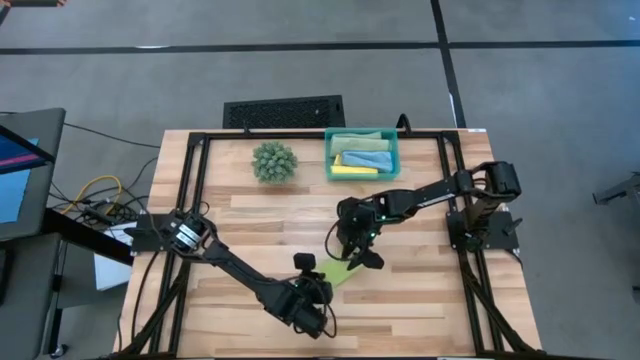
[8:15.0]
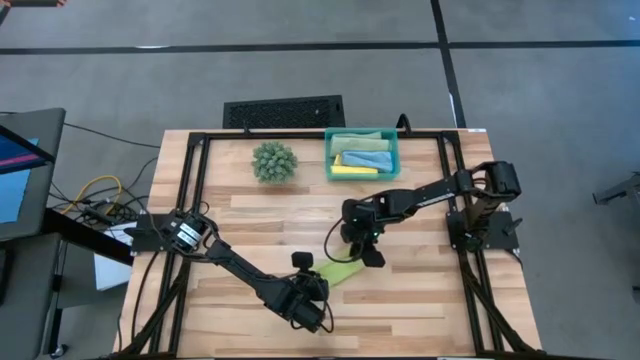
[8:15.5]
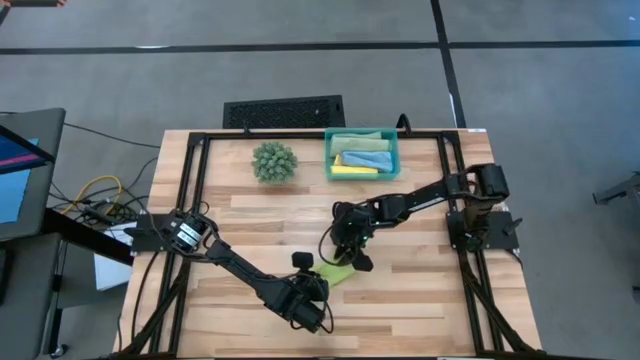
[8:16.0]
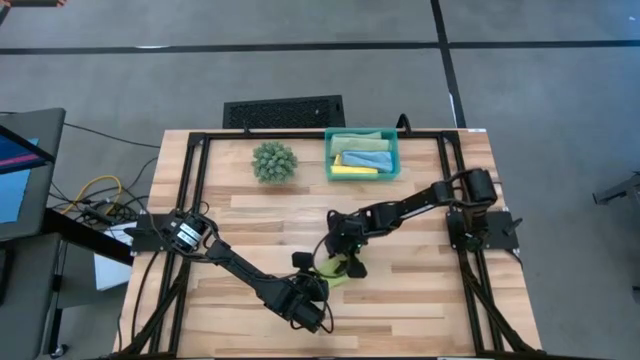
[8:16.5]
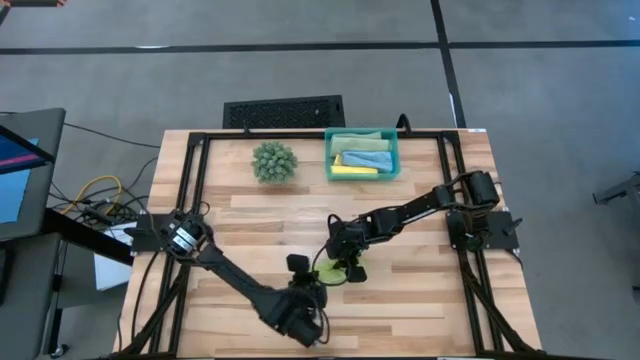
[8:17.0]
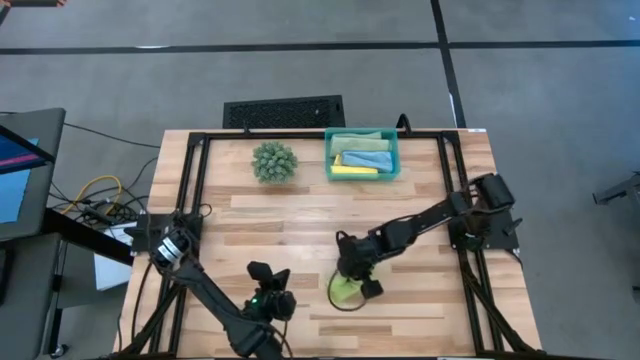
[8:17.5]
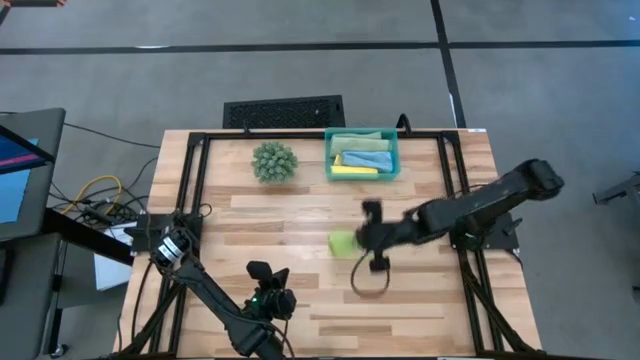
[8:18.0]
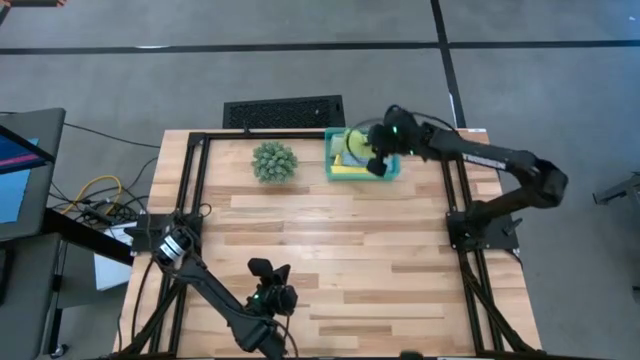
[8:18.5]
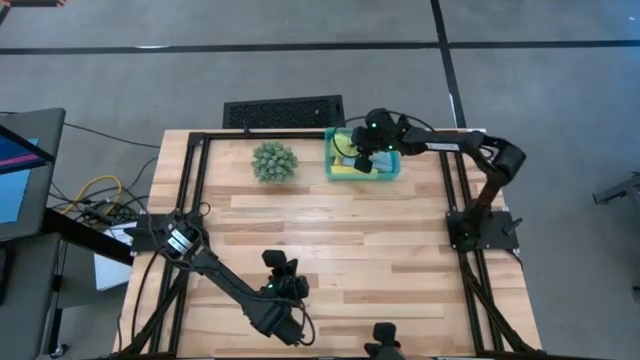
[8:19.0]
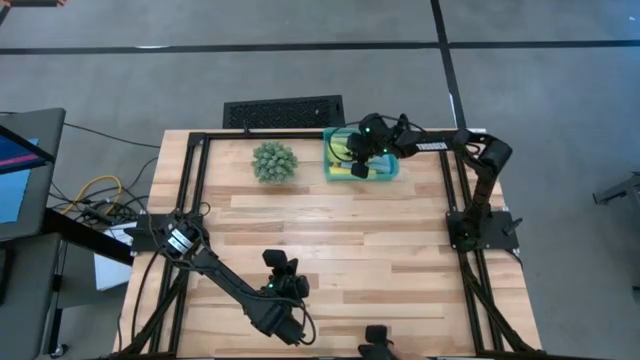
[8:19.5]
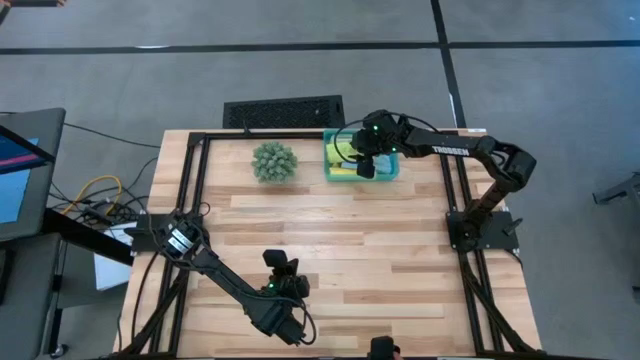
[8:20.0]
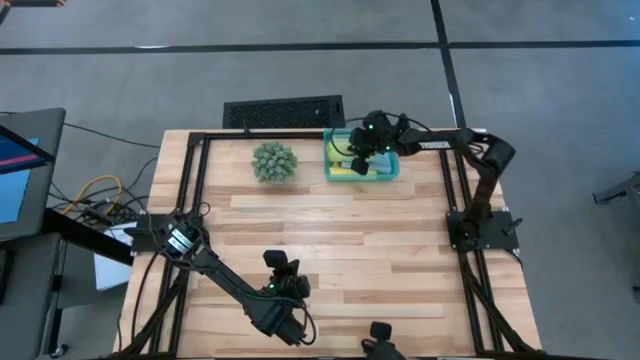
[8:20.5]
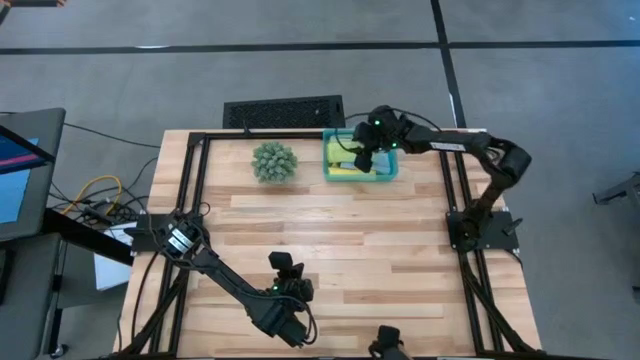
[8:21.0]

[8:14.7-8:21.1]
Task: Roll microfiber towels into tight, uniform cylinder then place into a basket
Put the green microfiber cloth into the green organizer bin

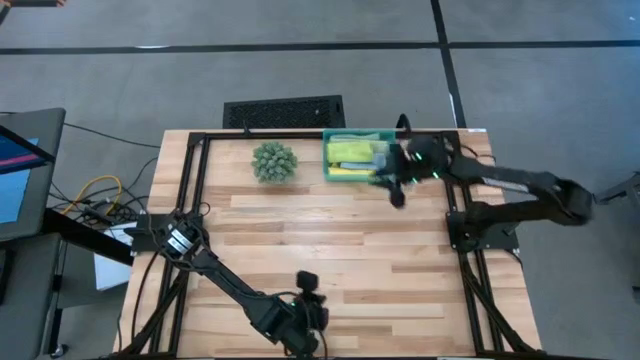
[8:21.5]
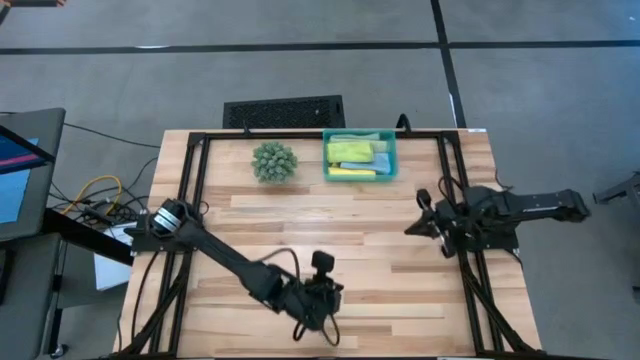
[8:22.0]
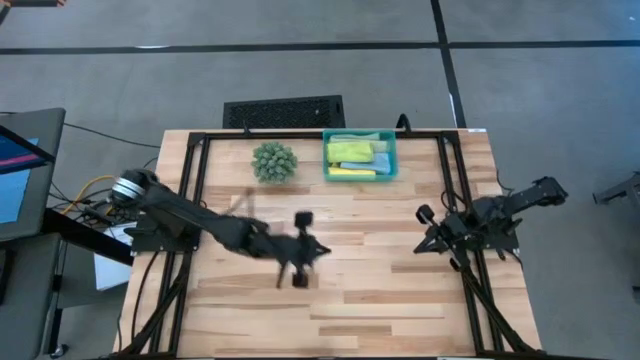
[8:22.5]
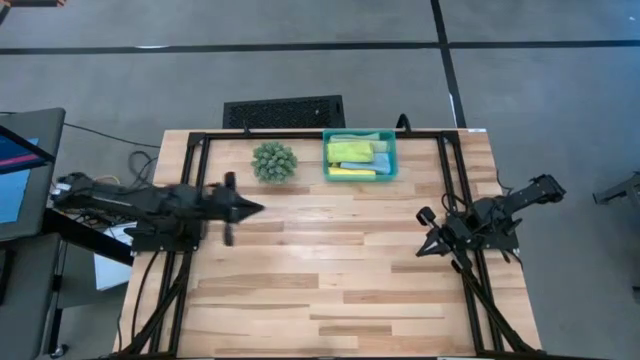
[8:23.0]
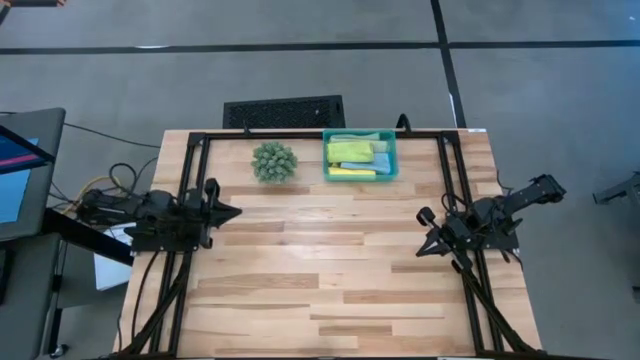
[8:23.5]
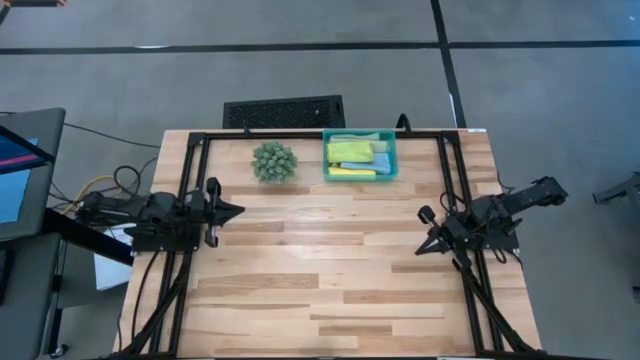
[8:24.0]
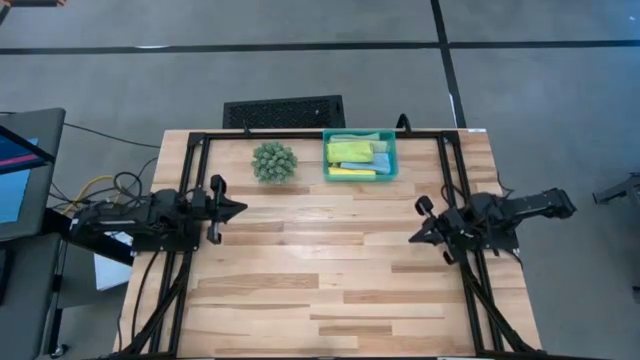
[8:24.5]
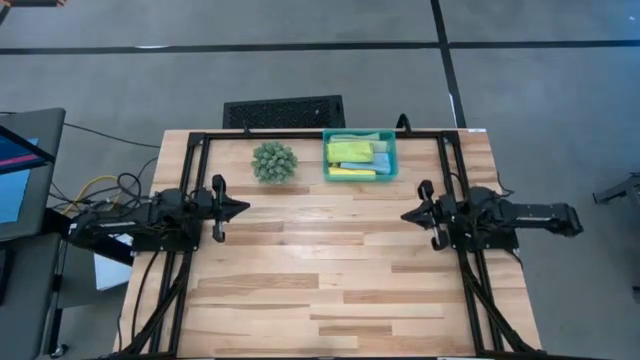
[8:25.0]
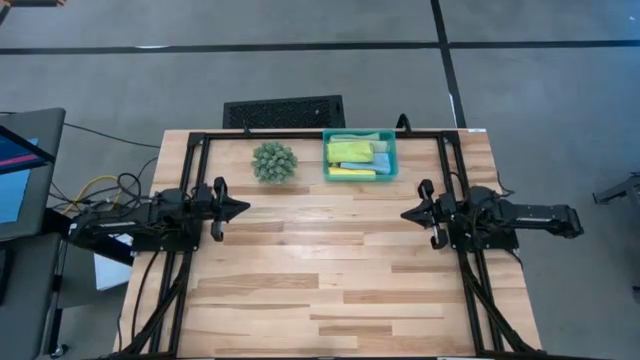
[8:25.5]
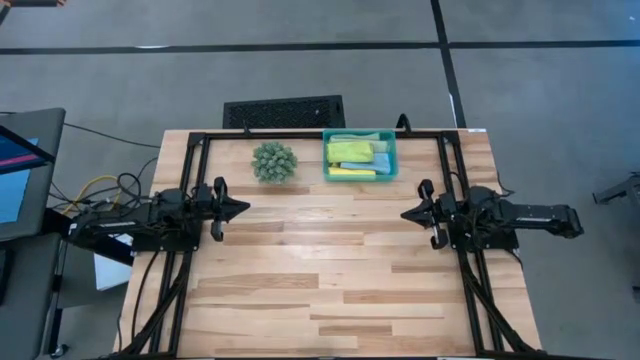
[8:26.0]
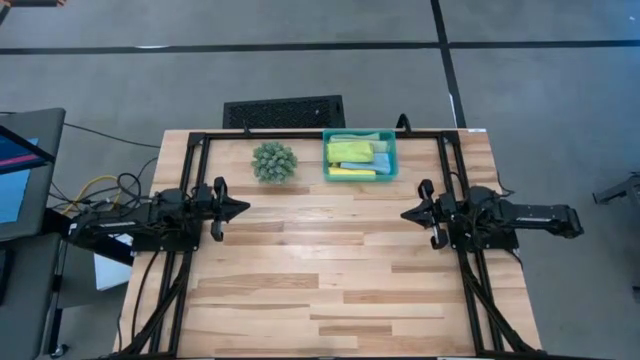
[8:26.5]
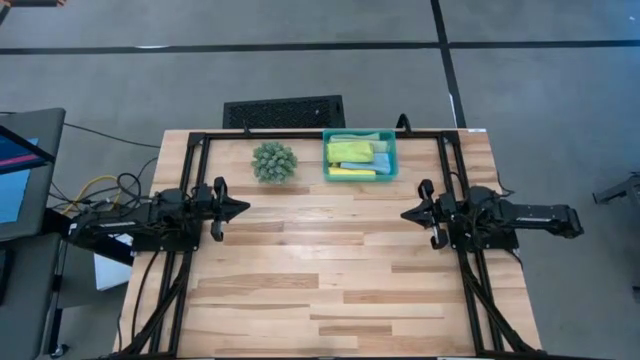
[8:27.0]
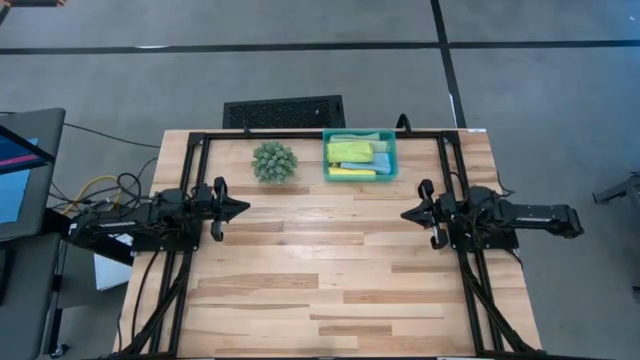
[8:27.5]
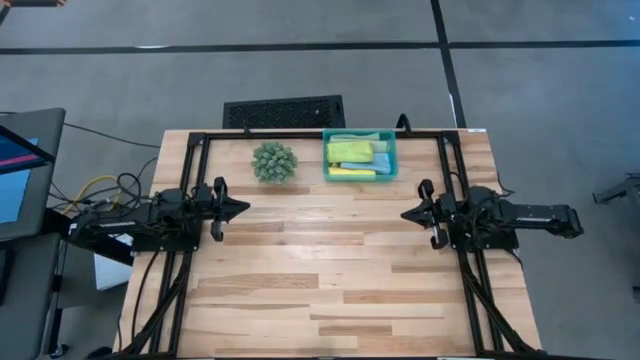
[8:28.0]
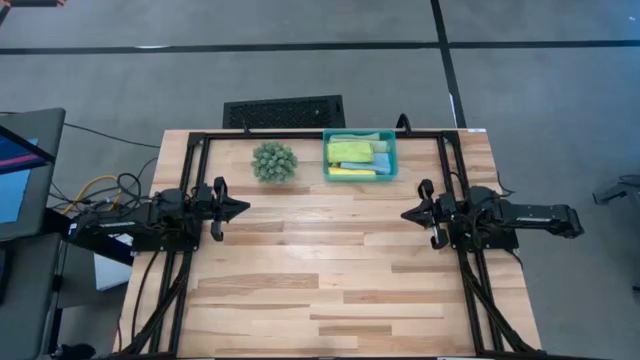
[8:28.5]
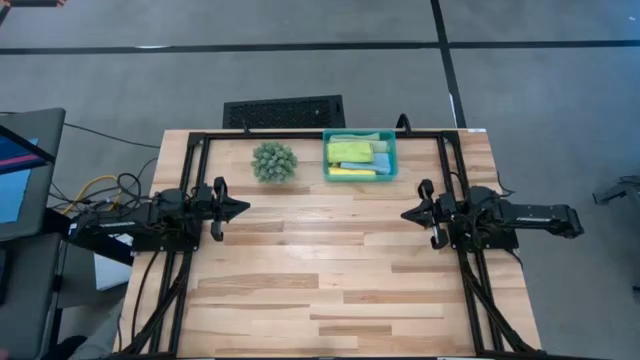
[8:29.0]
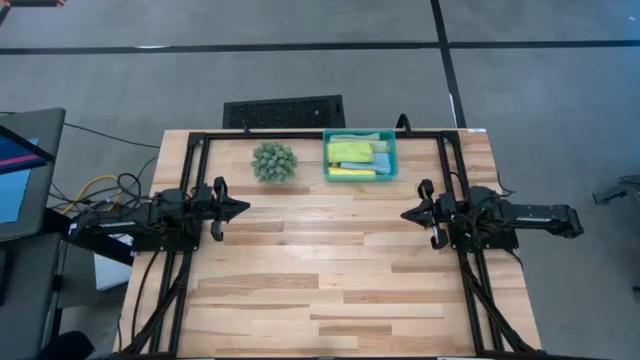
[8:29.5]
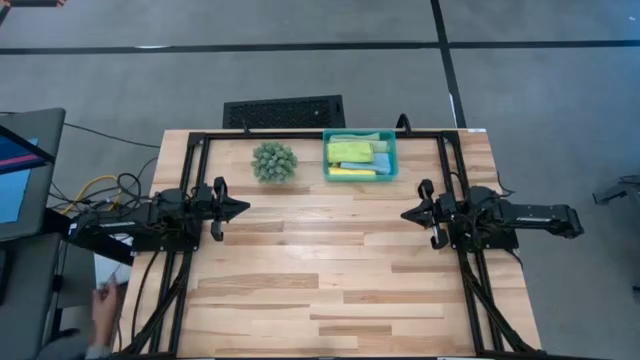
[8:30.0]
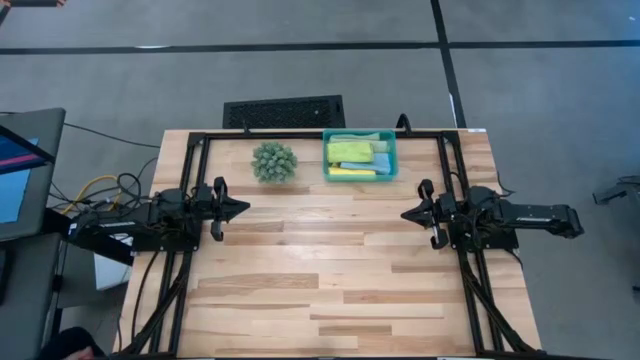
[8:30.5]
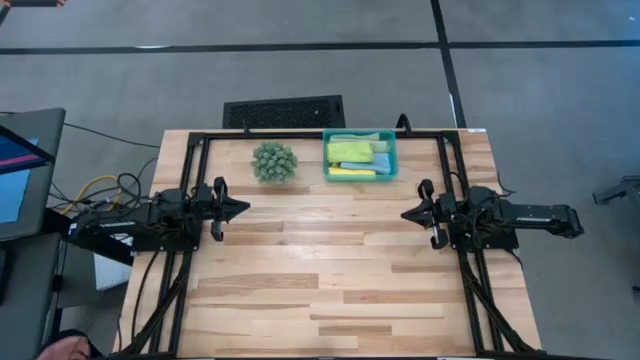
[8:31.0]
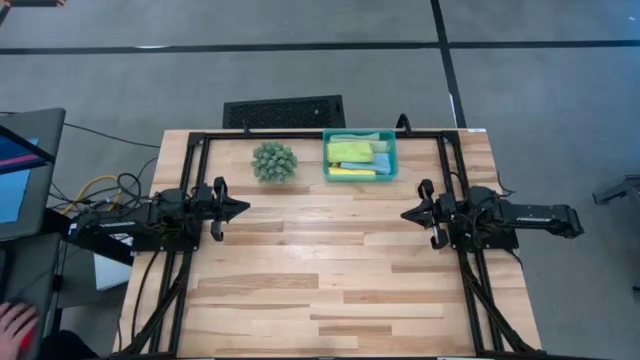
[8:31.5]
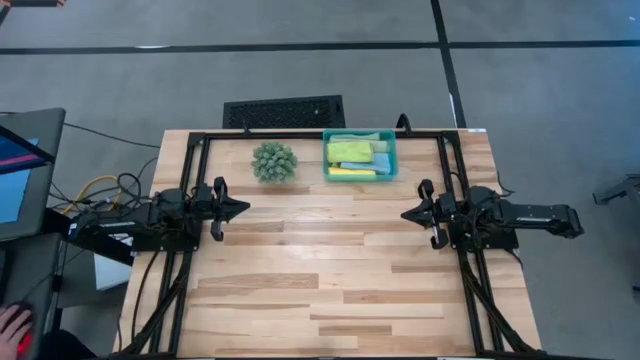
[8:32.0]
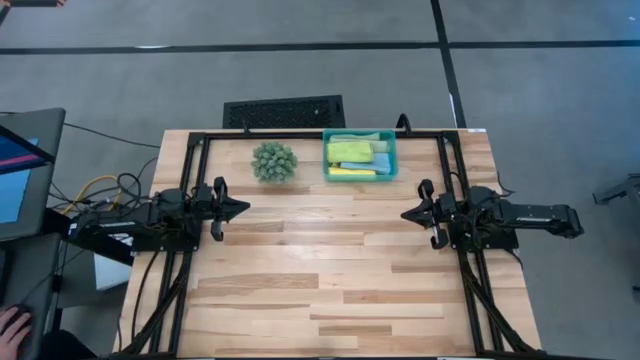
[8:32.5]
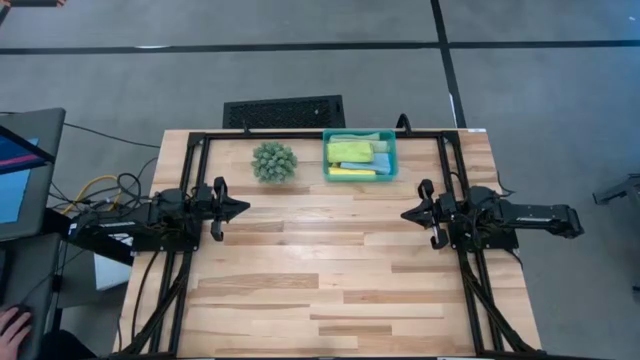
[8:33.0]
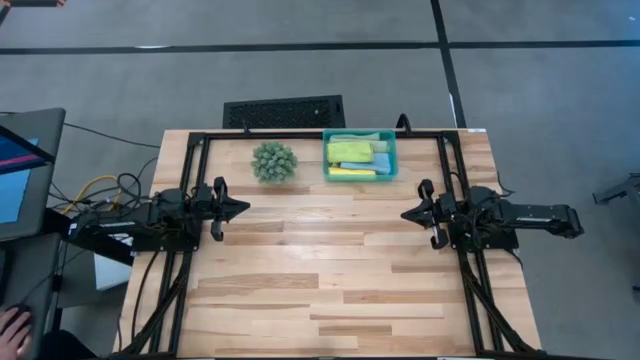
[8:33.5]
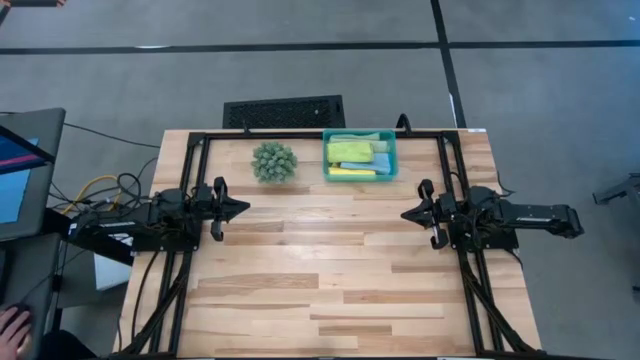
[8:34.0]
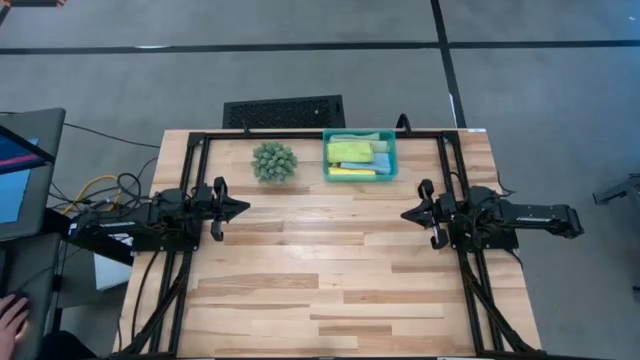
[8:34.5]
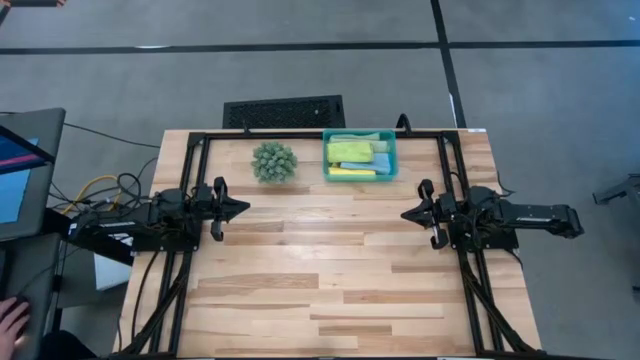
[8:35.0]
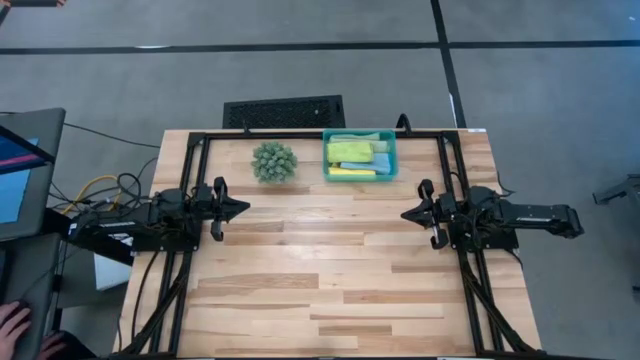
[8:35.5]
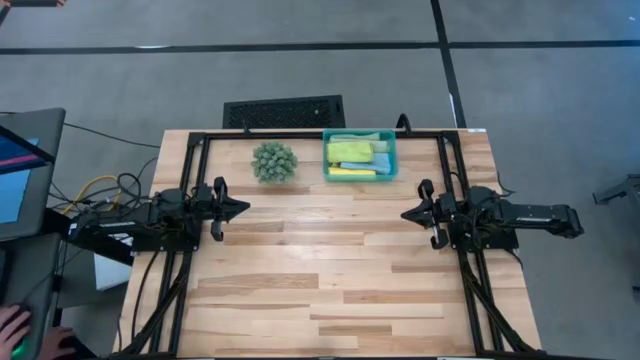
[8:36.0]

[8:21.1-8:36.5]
Return to Home Position
